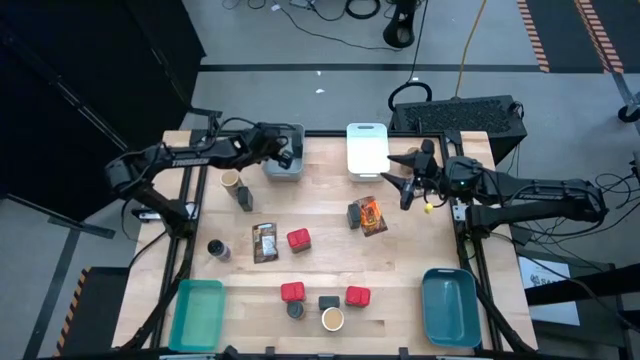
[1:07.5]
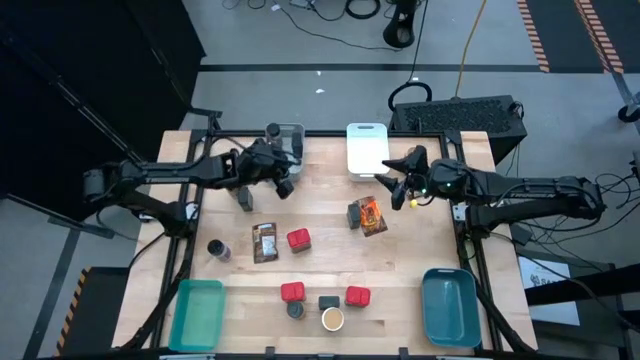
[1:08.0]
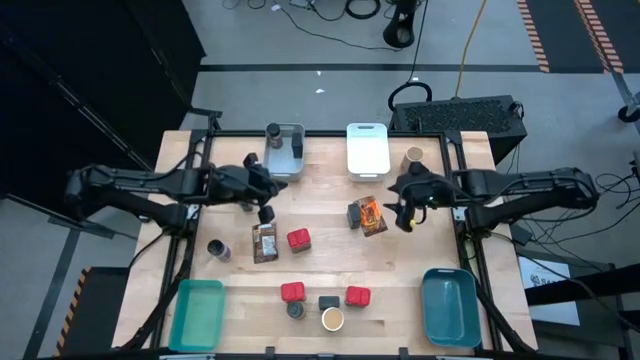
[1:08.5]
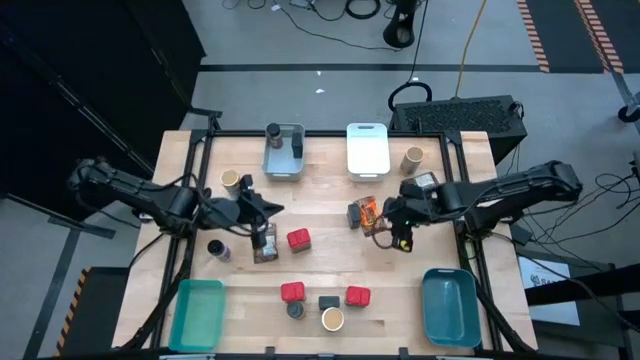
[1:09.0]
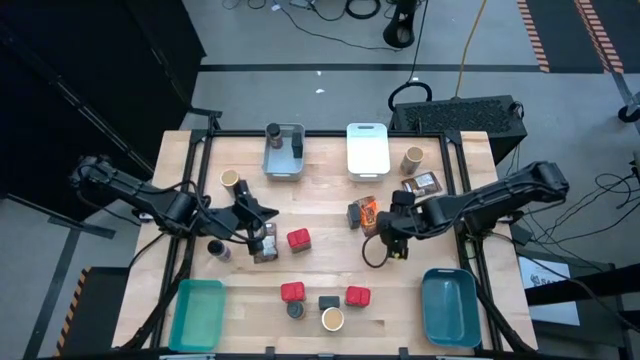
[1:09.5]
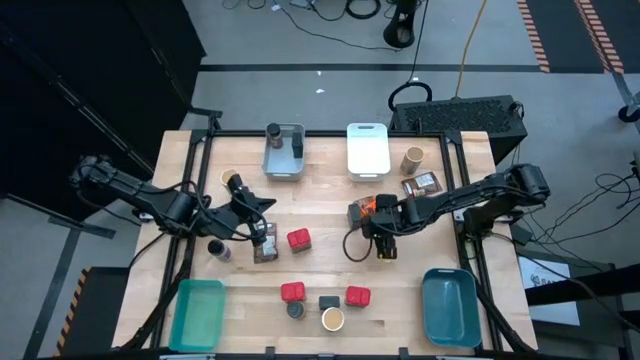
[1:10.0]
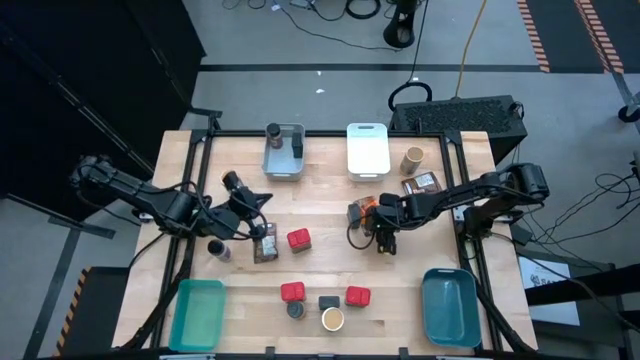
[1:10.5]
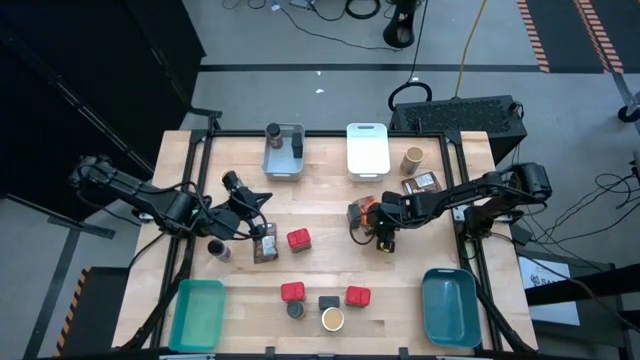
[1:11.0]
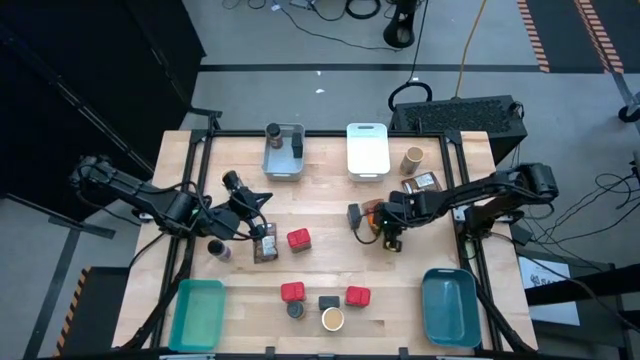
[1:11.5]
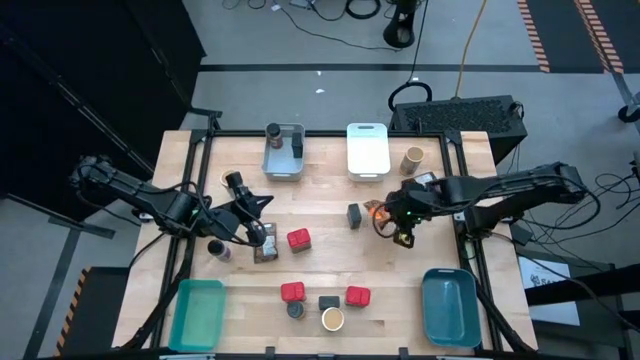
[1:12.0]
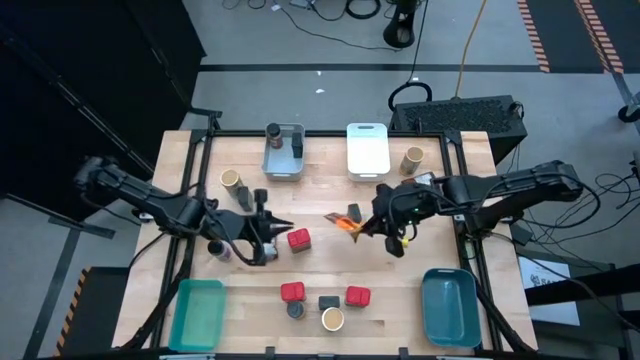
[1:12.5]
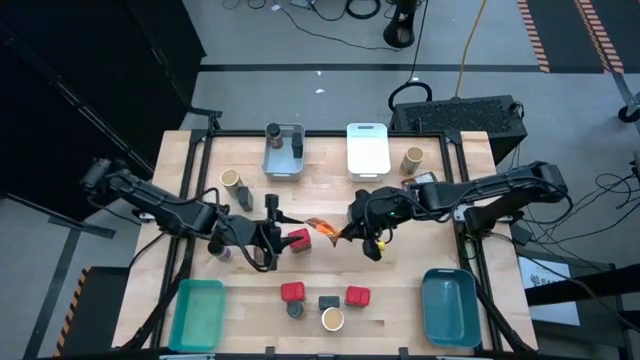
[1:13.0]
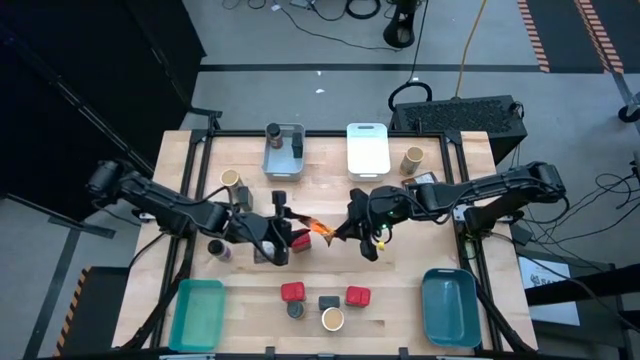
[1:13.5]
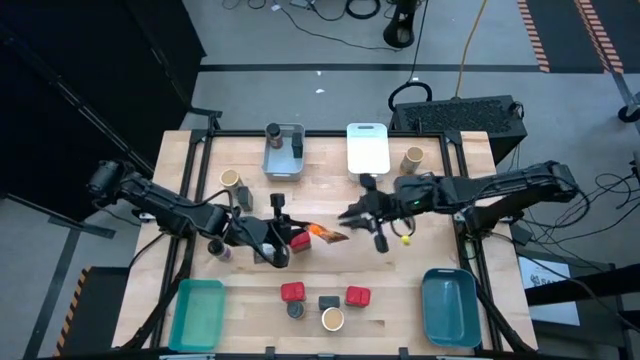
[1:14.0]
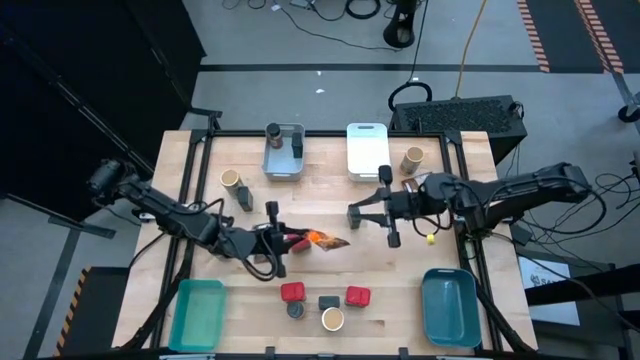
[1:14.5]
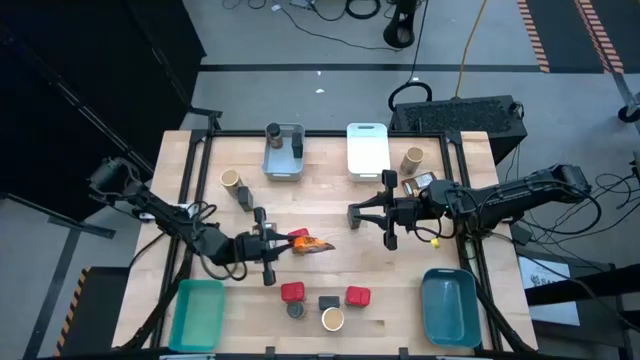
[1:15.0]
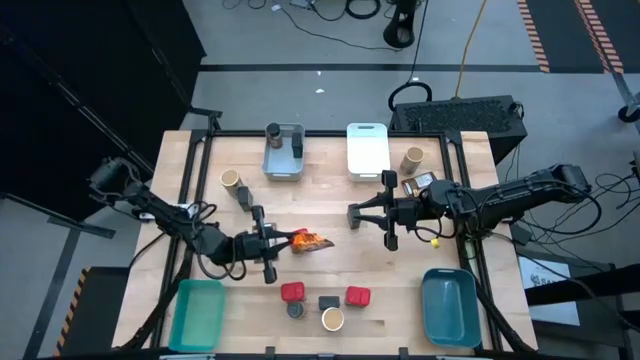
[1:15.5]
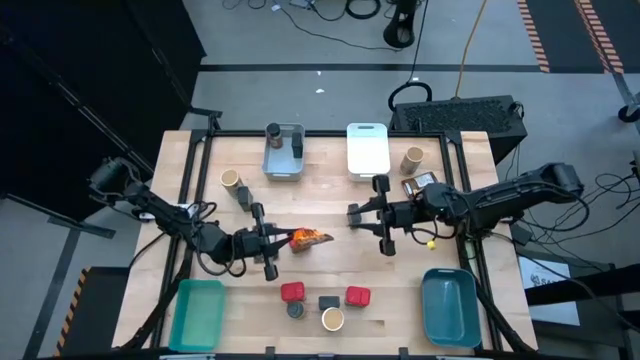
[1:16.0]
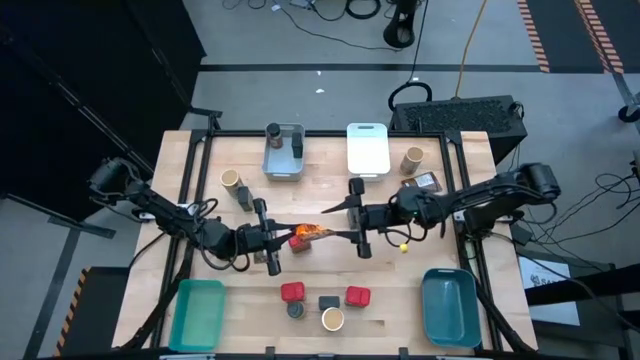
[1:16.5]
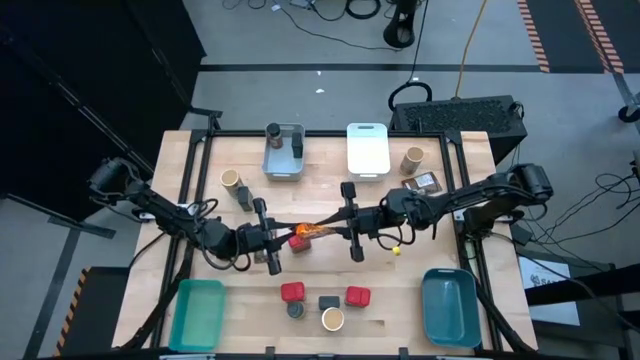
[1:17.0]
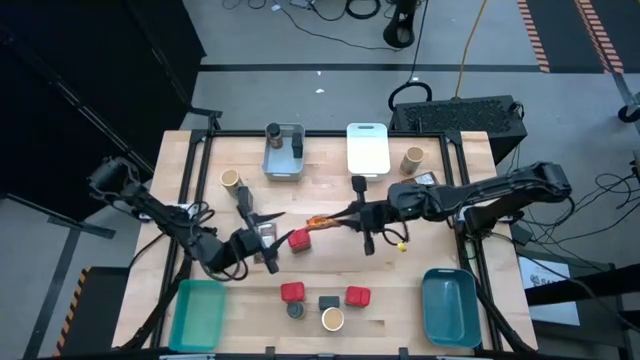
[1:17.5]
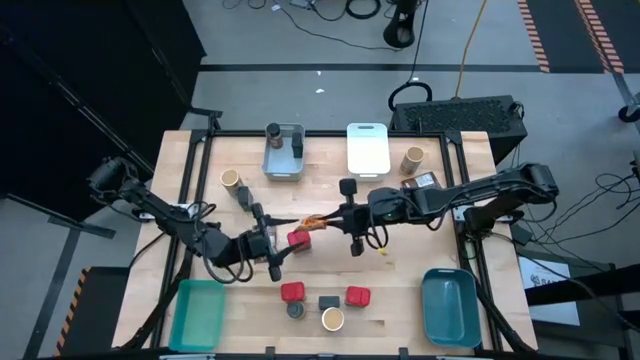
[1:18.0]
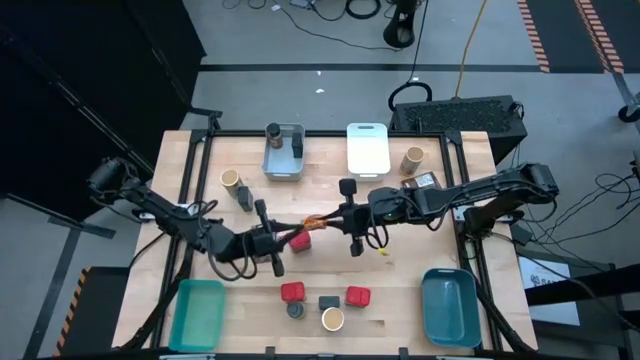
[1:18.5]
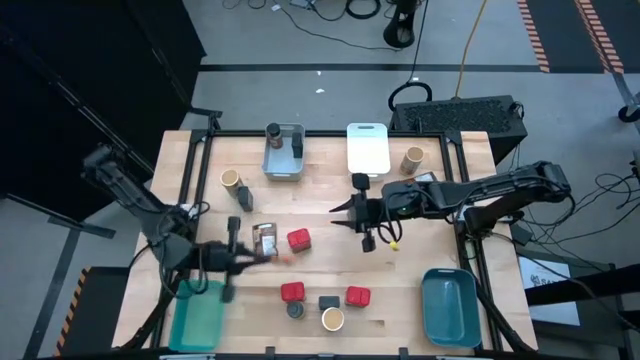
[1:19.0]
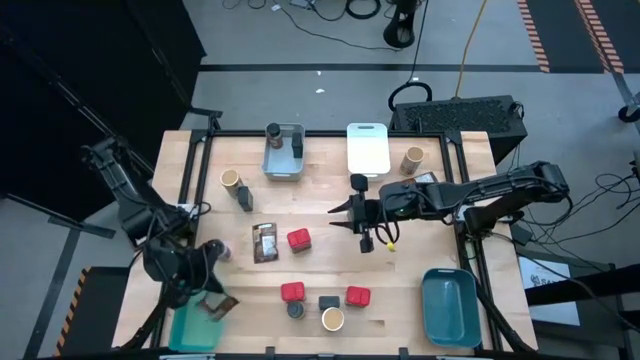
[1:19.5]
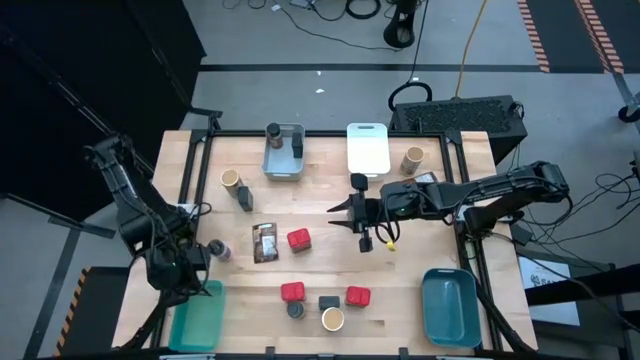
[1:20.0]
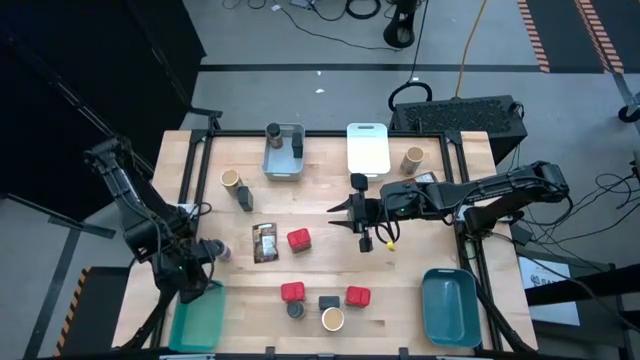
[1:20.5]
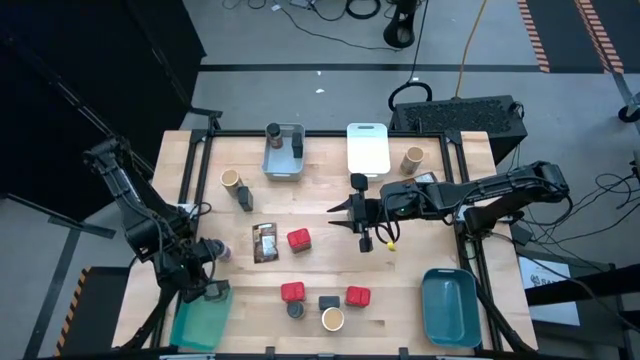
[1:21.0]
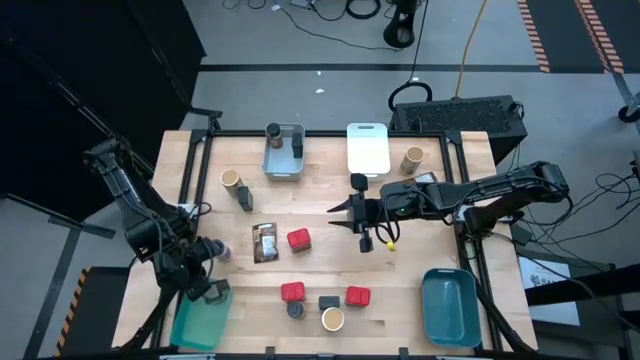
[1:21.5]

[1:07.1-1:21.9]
Task: Sort spices by type
Put the orange spice pack into the green bin

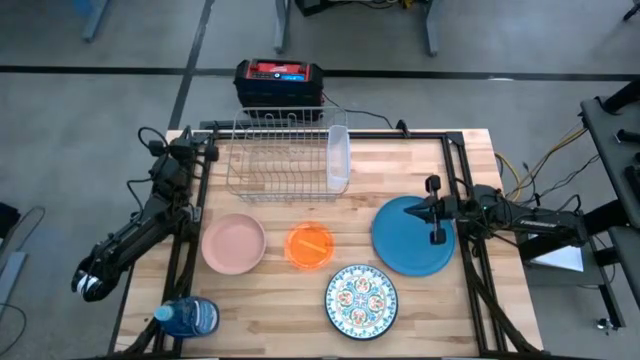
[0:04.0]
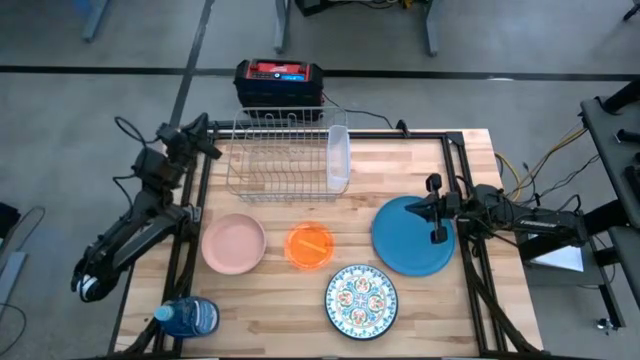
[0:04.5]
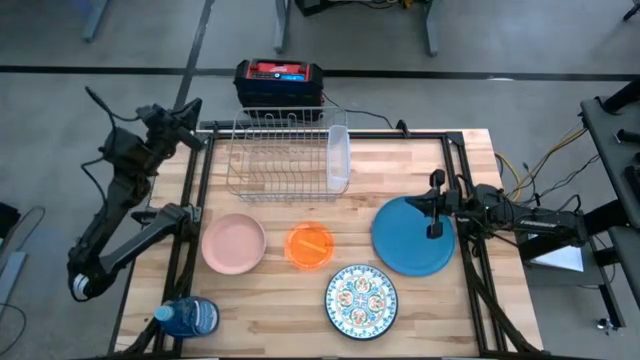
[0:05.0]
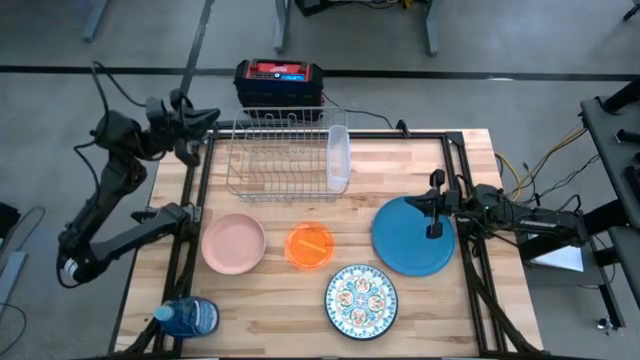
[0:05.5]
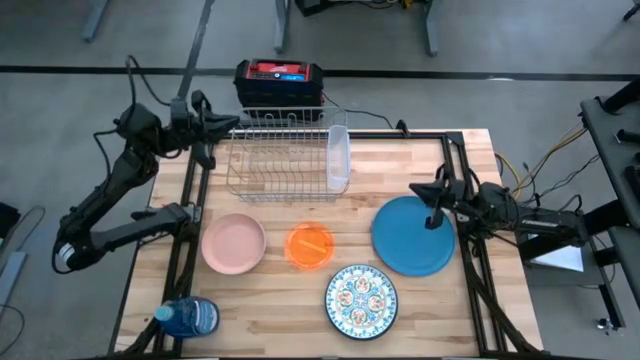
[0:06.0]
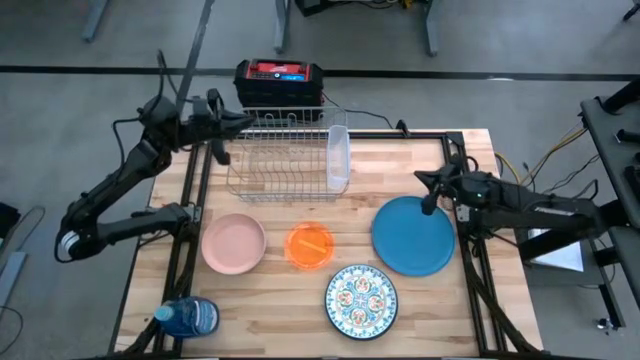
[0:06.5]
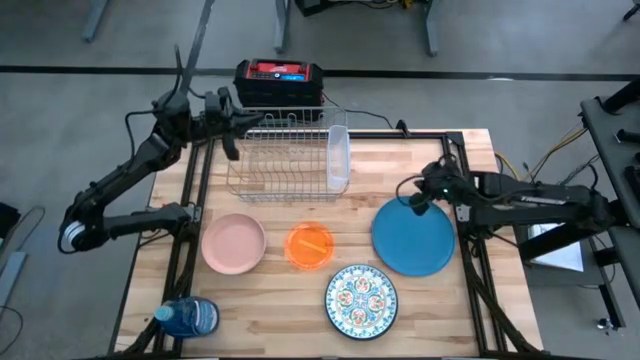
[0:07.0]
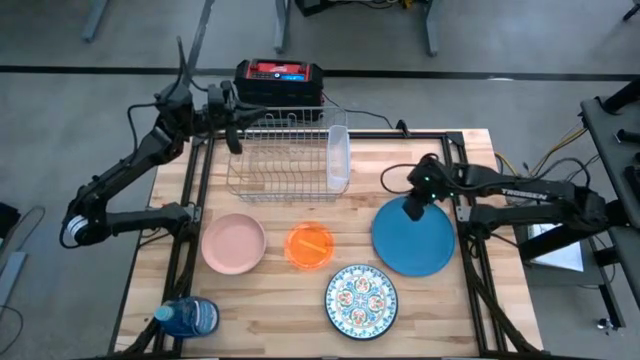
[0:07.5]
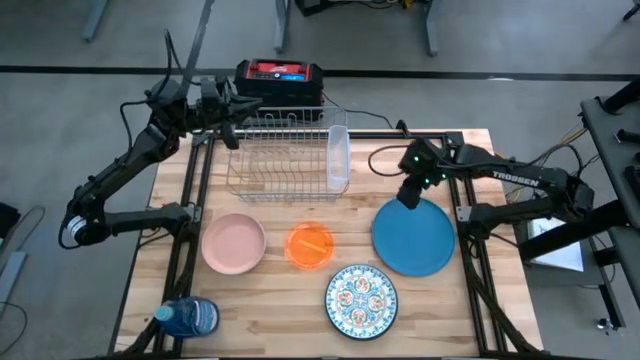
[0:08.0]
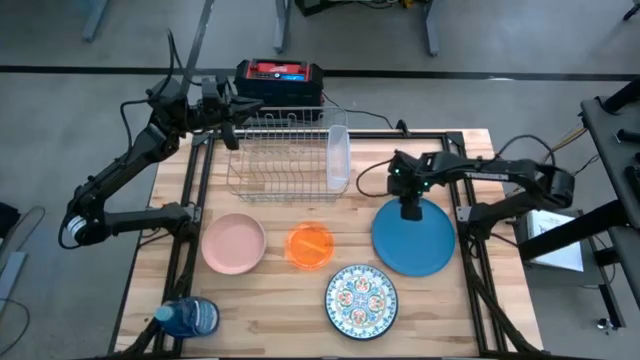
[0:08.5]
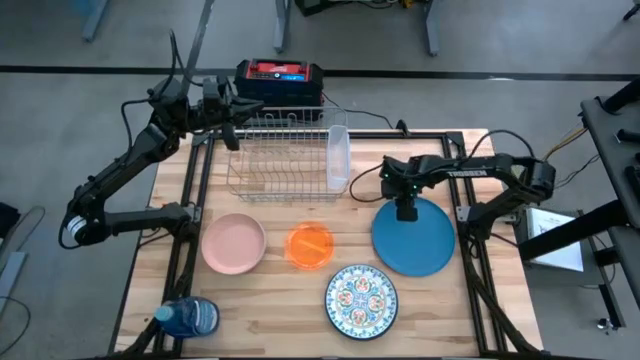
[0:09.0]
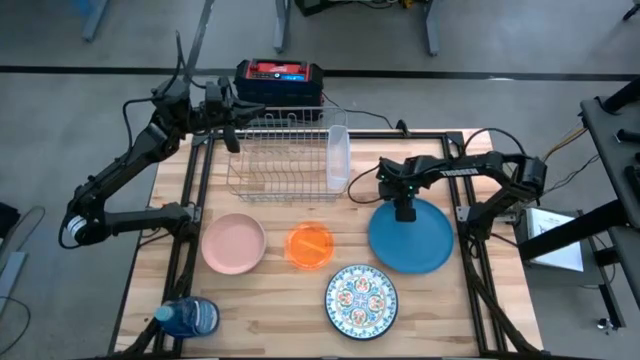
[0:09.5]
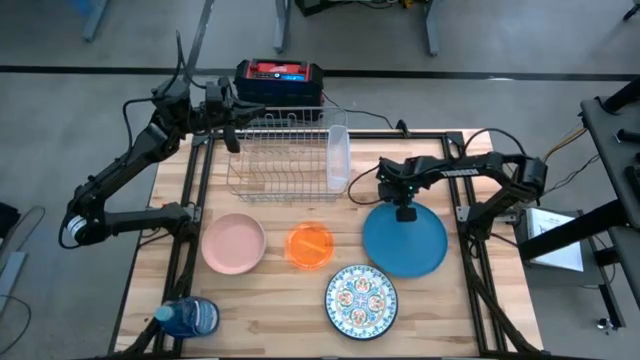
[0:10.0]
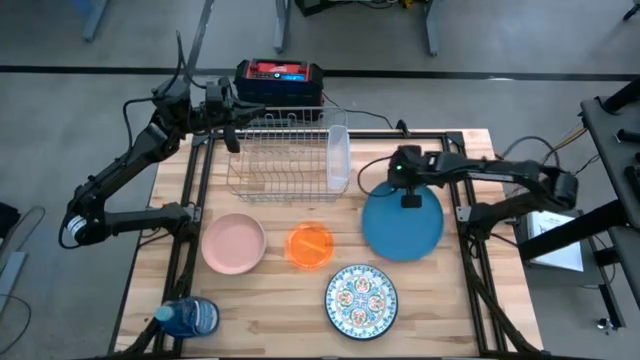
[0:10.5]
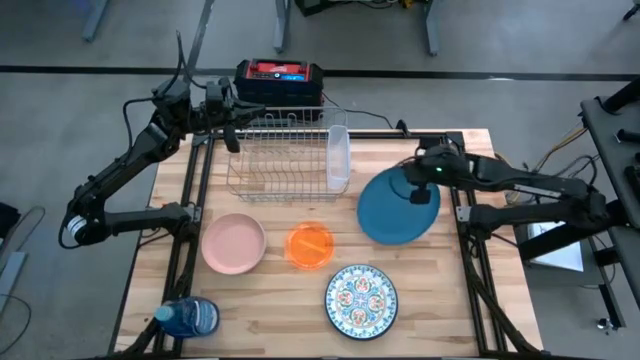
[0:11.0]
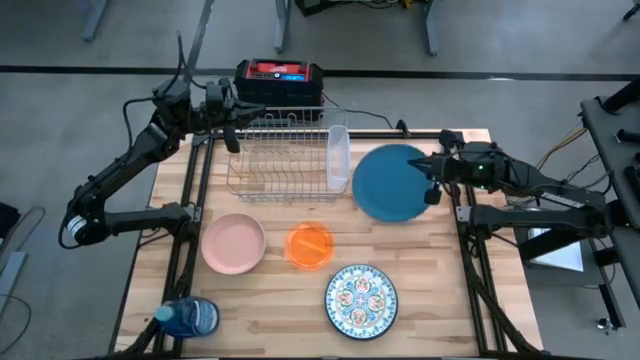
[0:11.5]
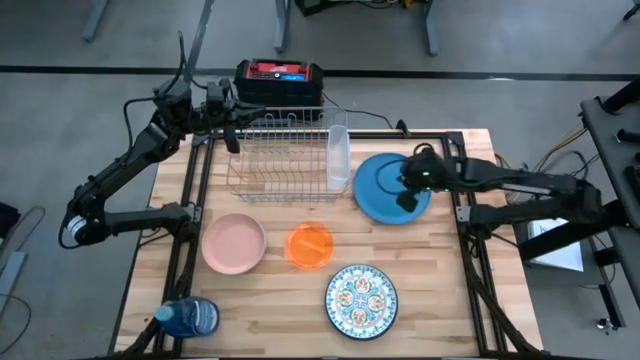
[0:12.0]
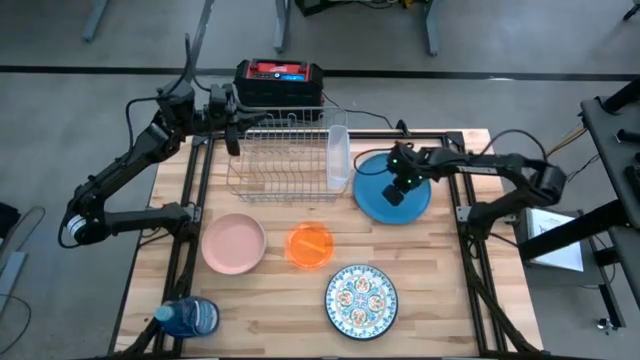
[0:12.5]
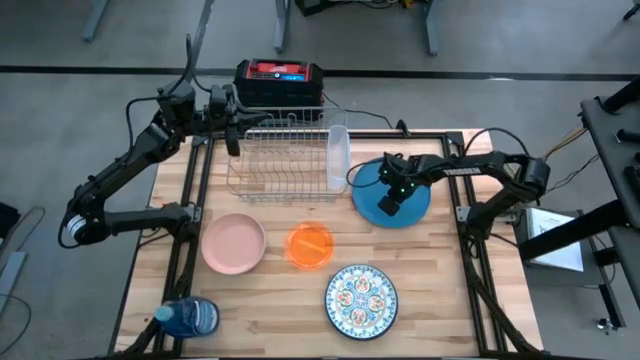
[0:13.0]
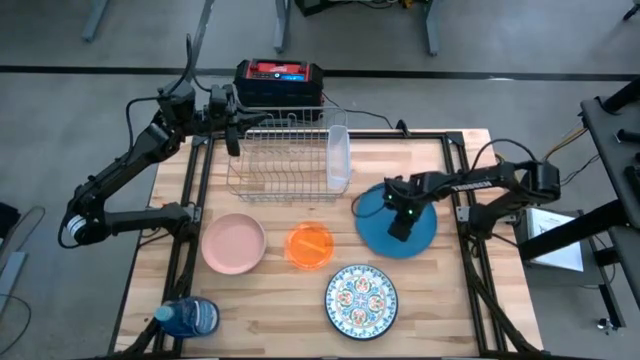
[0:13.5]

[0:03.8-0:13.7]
Task: Sort dishes
Put the blue plate in the dishwasher rack
